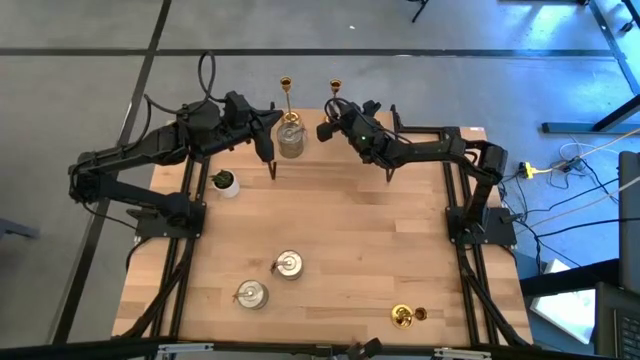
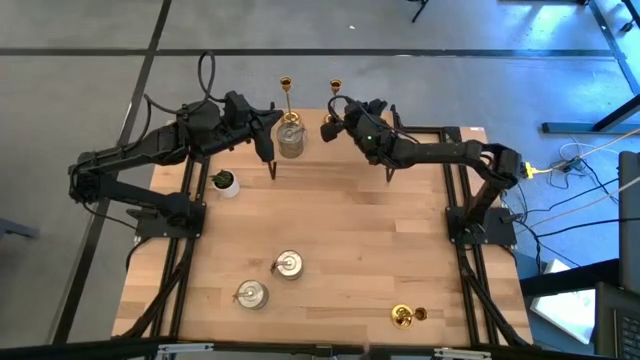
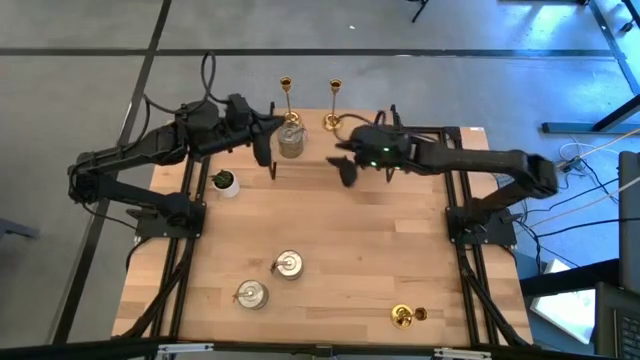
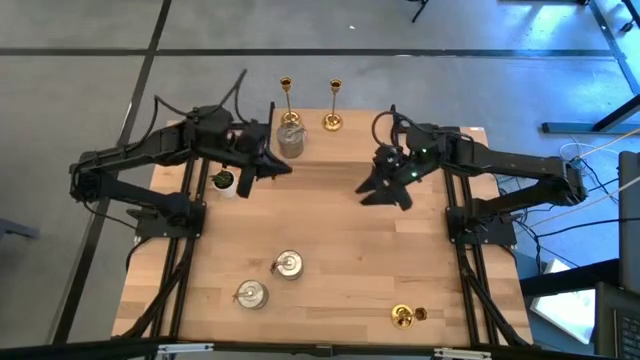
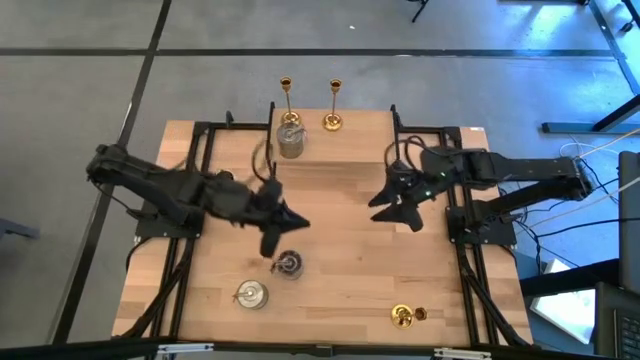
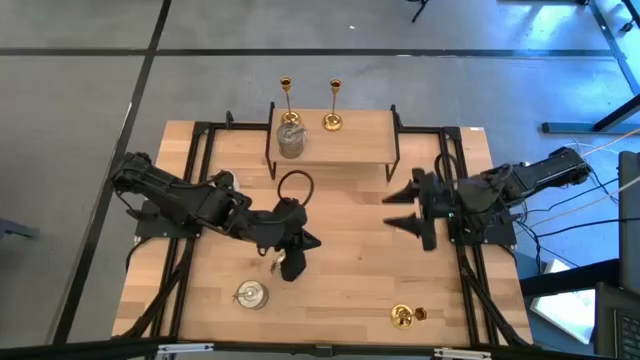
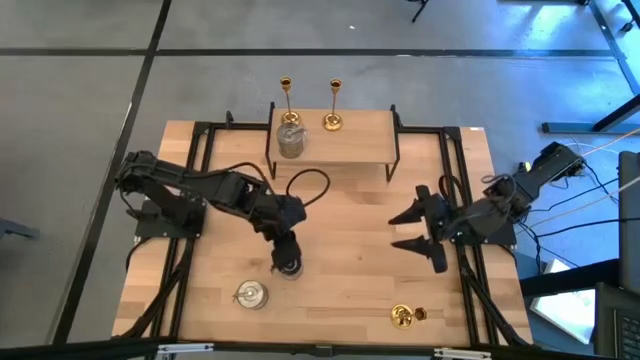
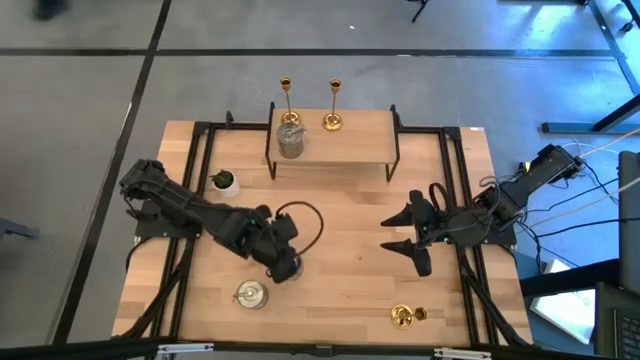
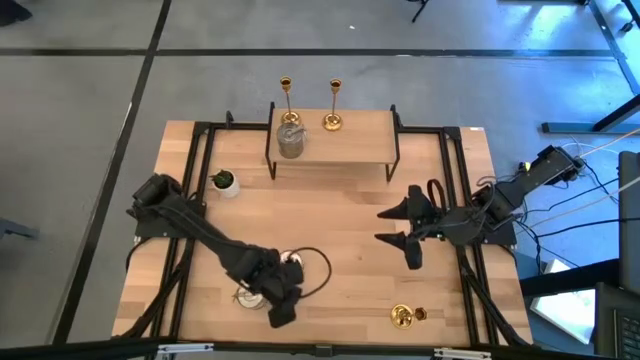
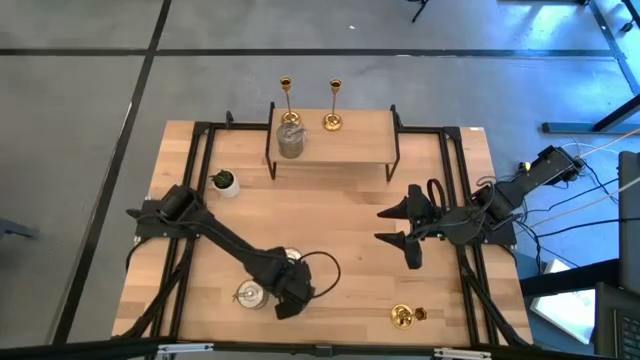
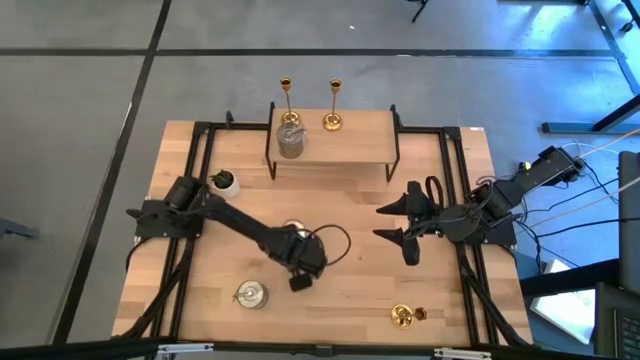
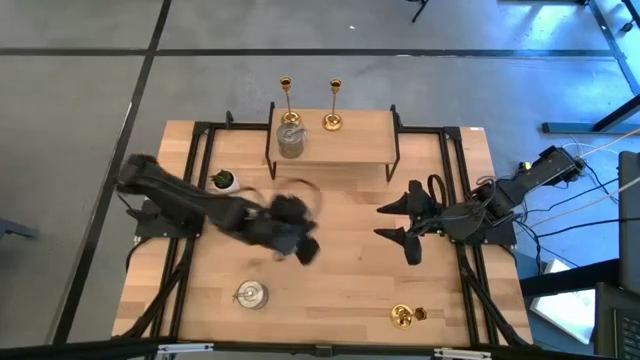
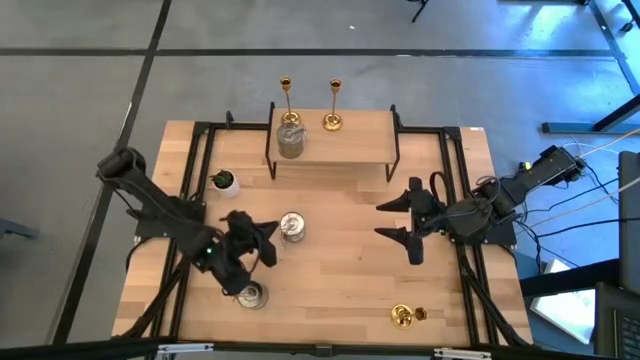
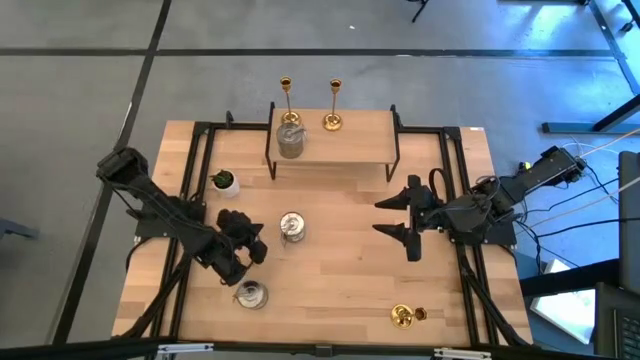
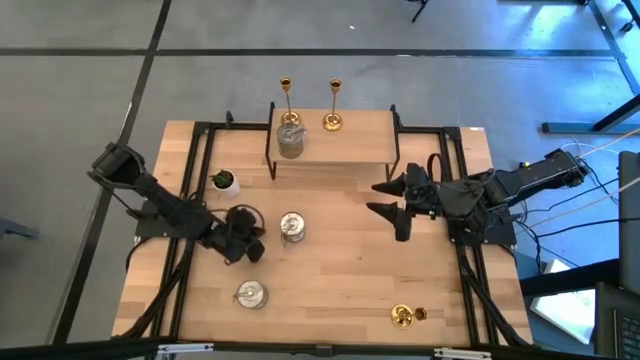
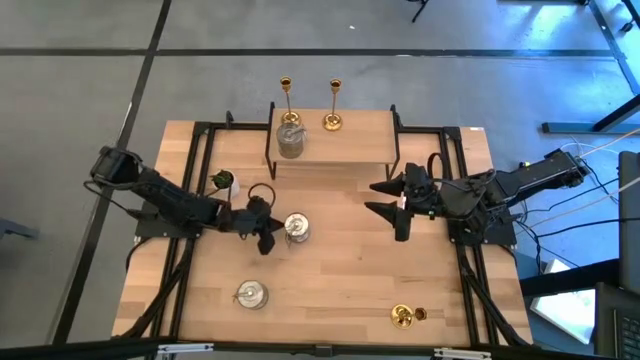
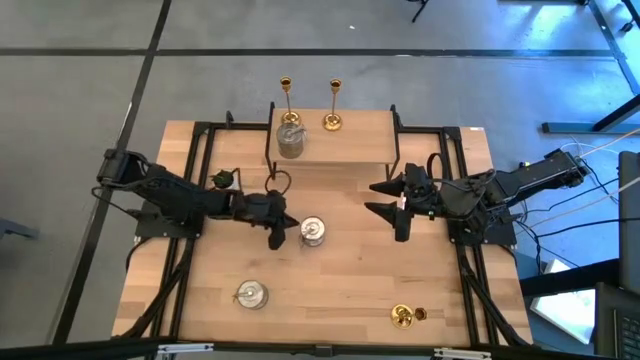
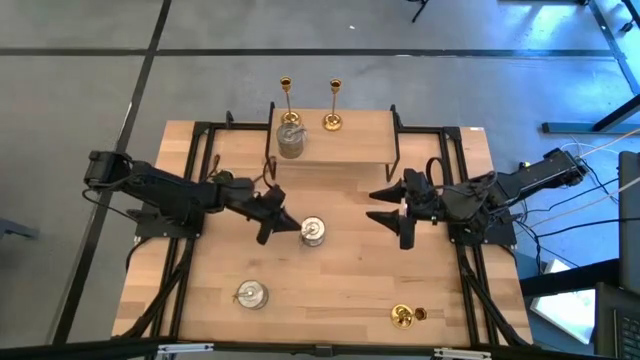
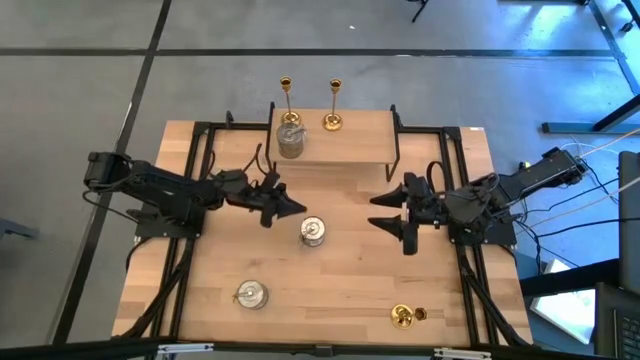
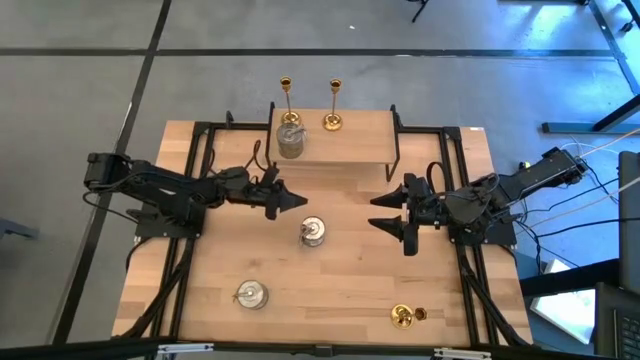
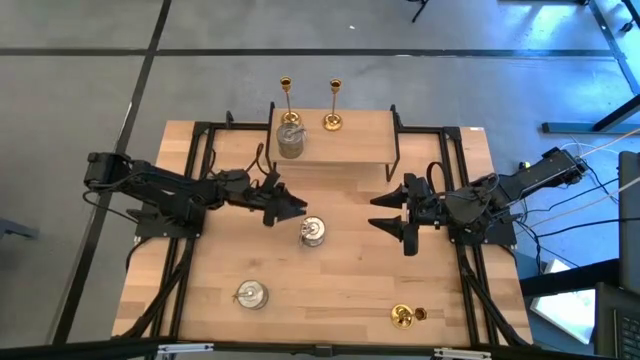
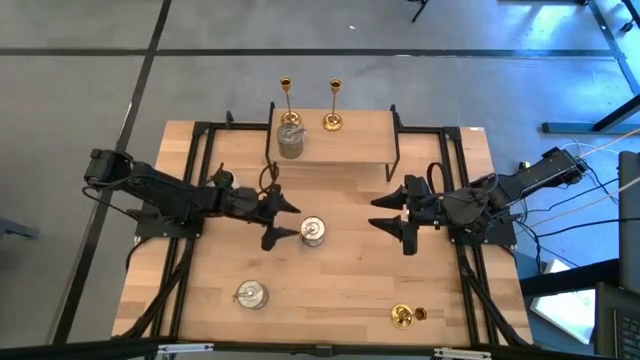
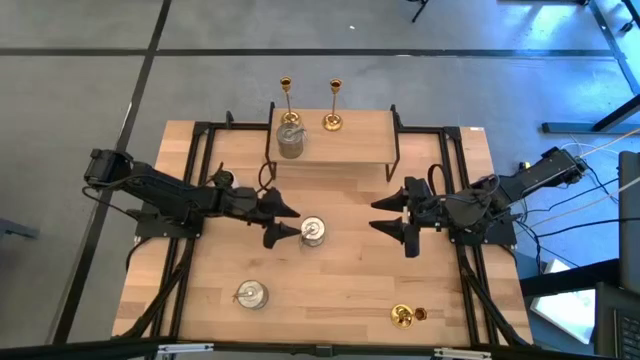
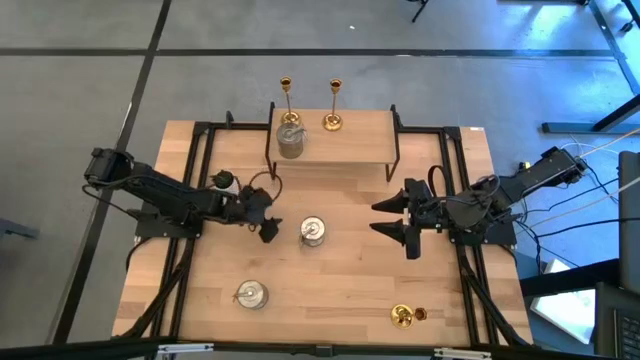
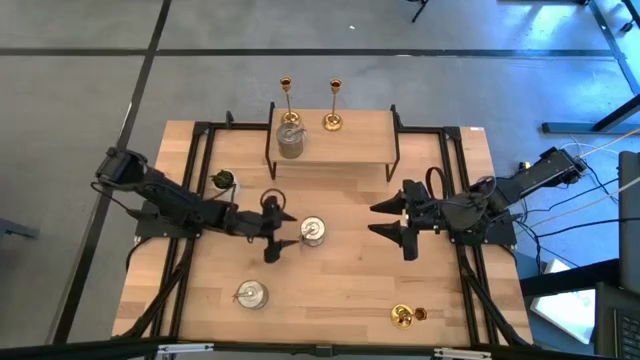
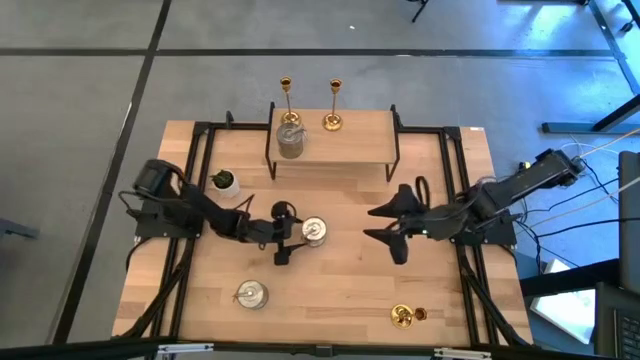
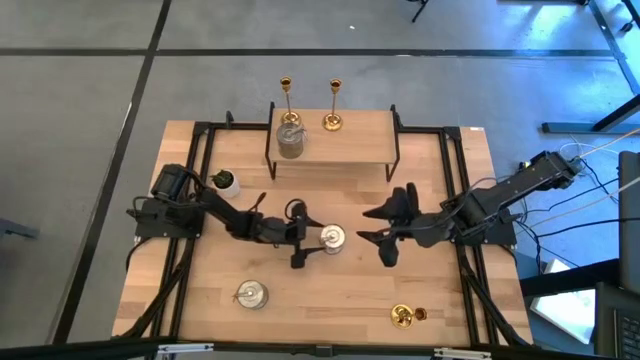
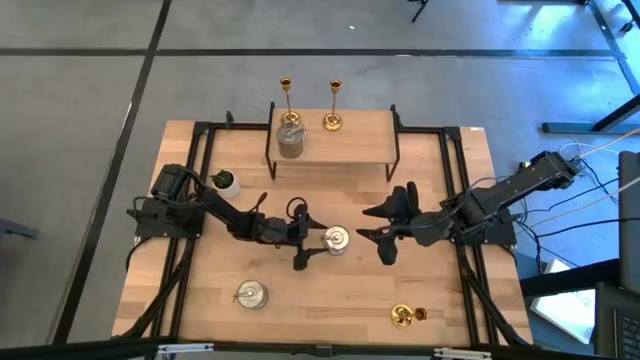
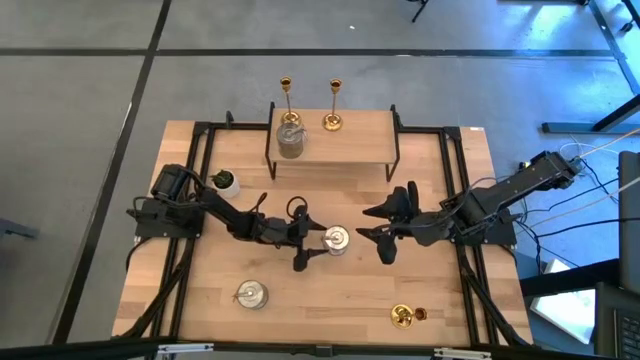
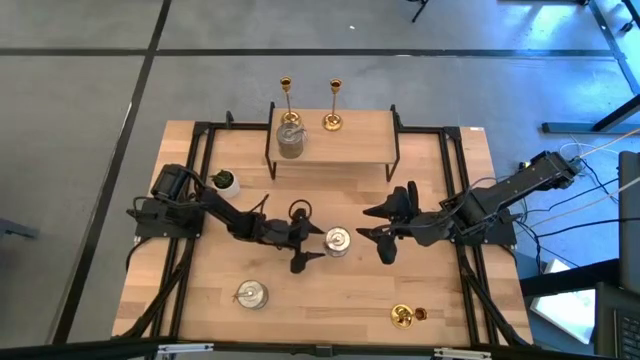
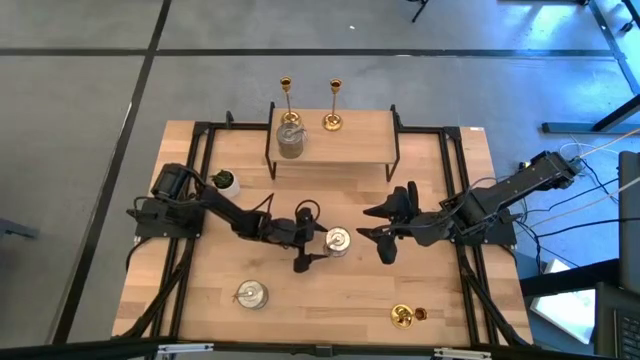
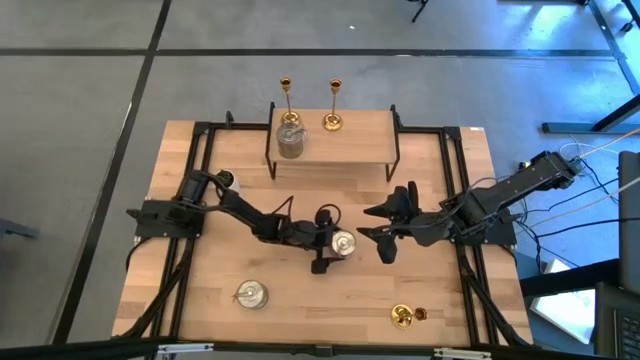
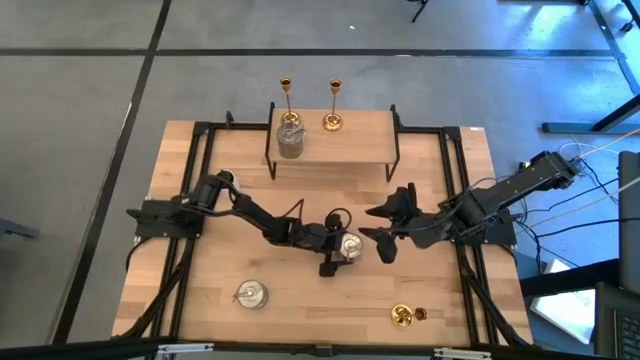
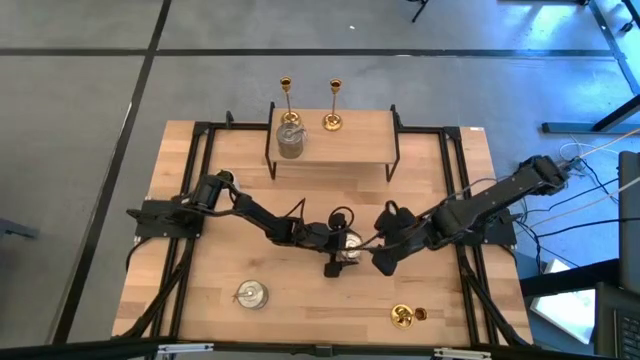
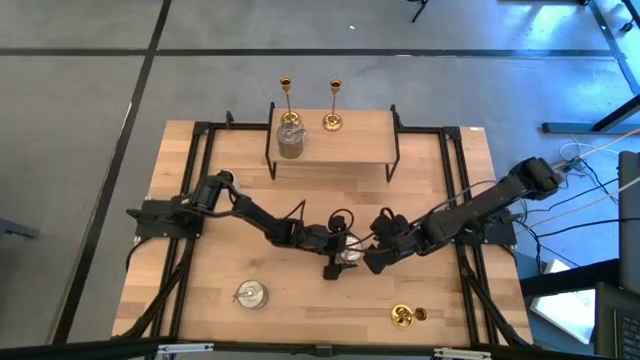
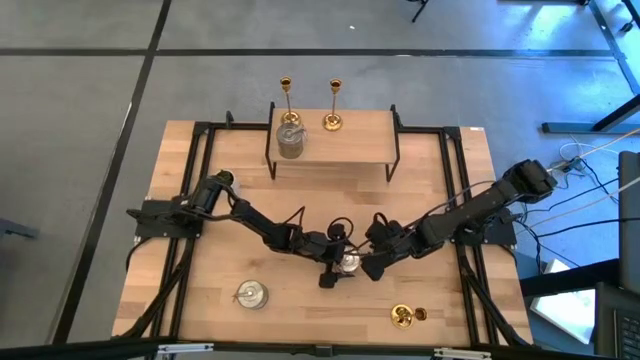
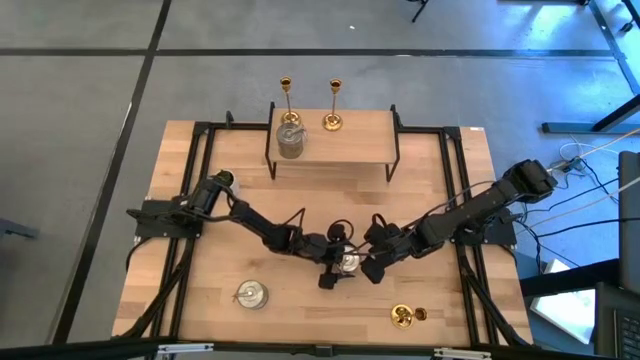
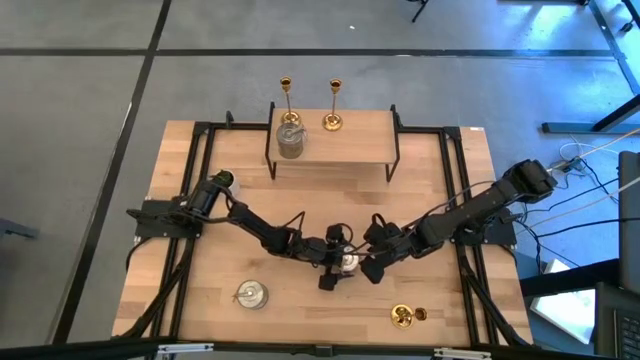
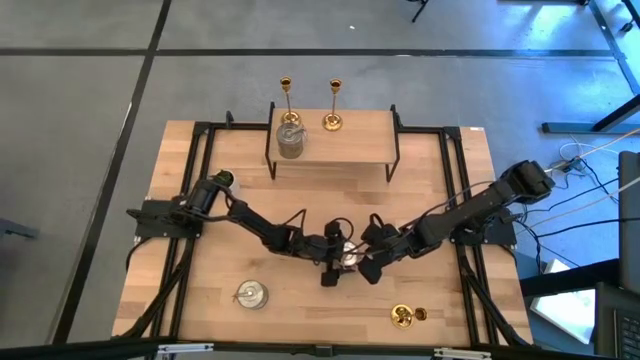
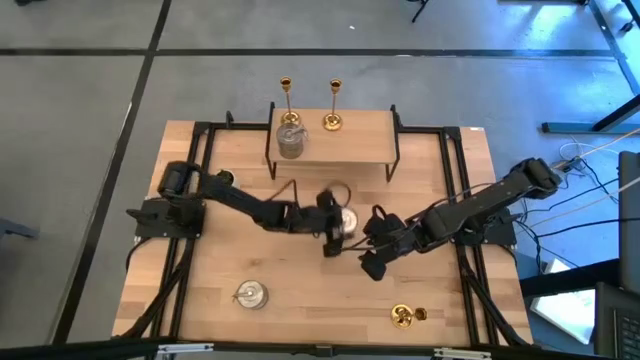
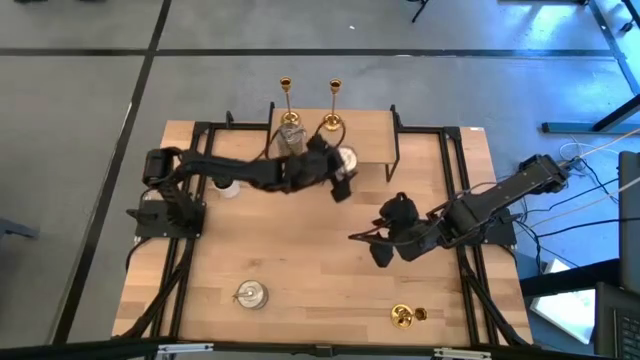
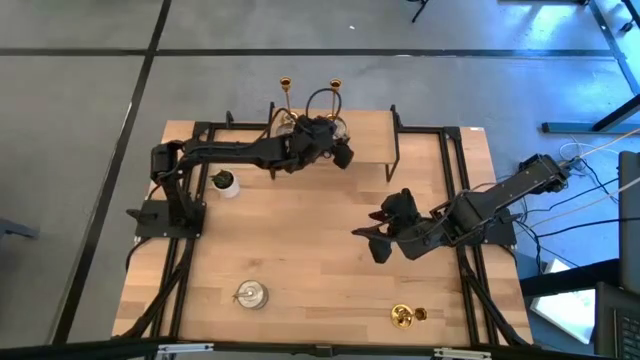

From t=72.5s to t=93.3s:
Task: Pick & Place candle stick holders
Put the top silver scented candle on the shelf aligned with the other silver scented candle

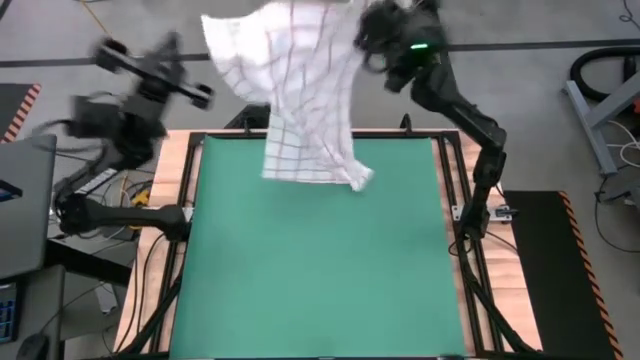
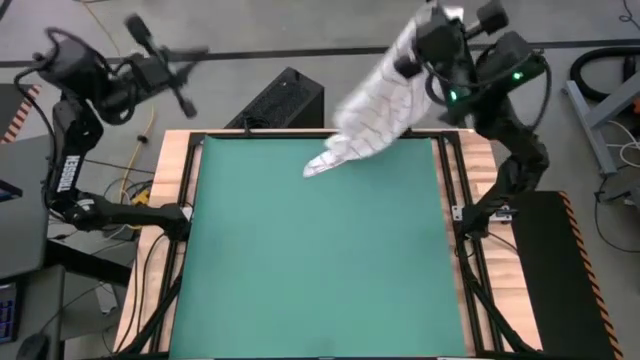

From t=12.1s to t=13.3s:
Task: Roll towel into tight, uniform cylinder
Fold the white towel
